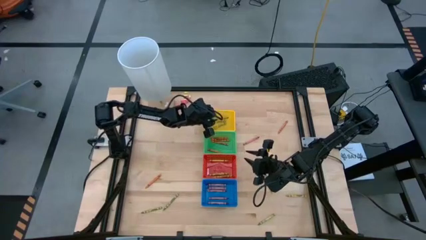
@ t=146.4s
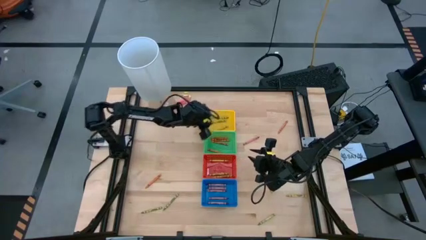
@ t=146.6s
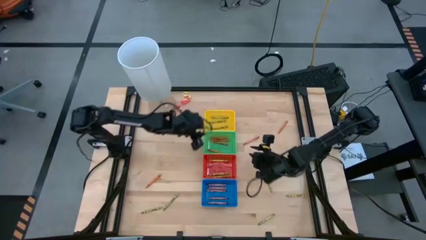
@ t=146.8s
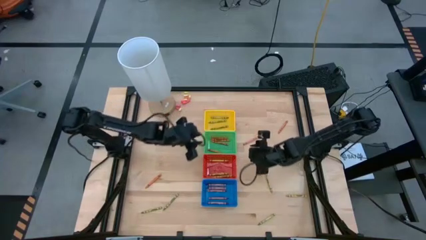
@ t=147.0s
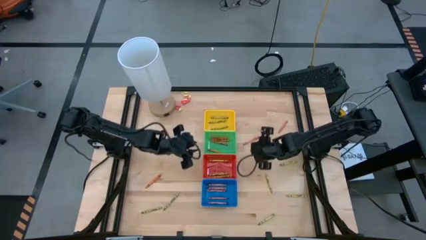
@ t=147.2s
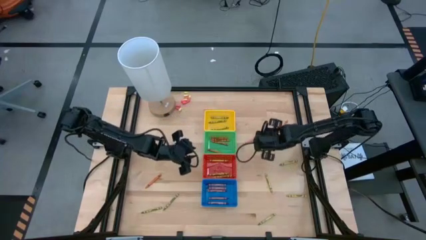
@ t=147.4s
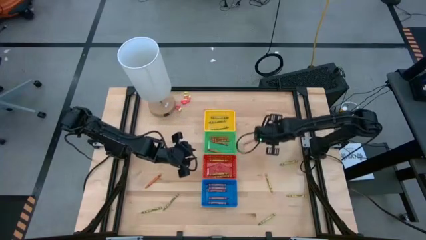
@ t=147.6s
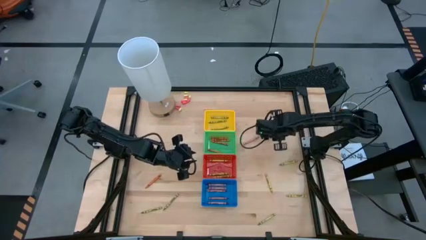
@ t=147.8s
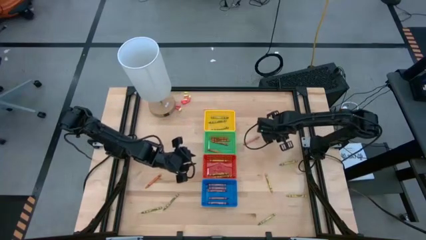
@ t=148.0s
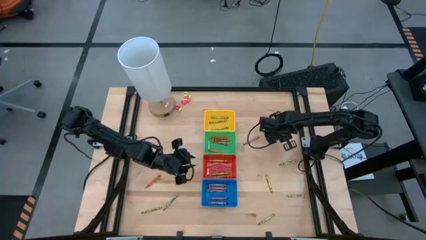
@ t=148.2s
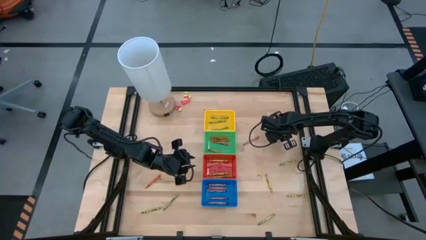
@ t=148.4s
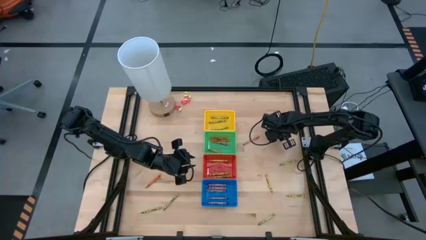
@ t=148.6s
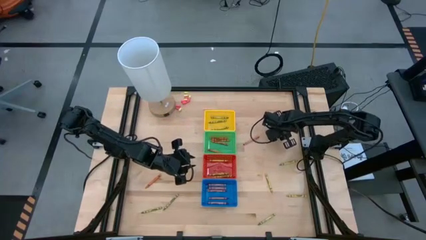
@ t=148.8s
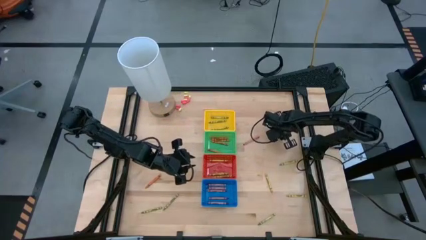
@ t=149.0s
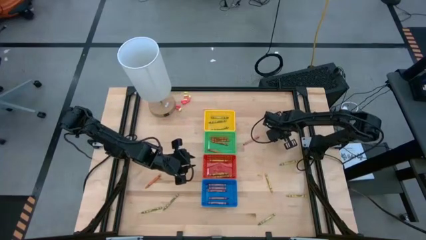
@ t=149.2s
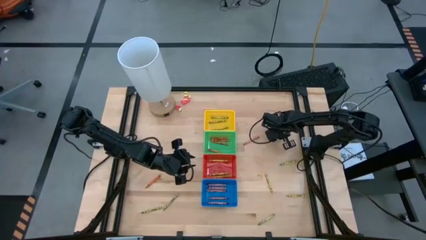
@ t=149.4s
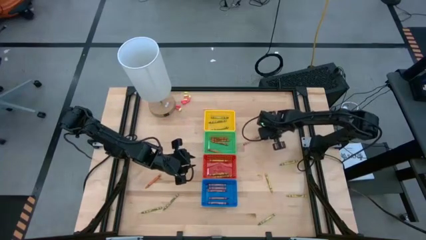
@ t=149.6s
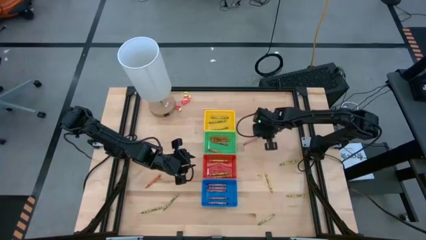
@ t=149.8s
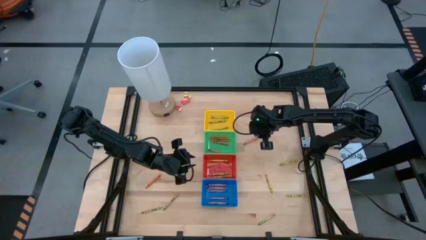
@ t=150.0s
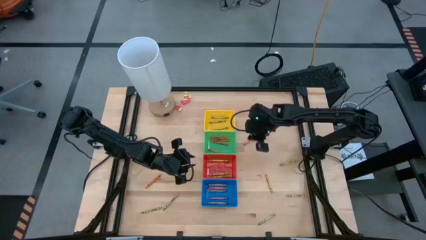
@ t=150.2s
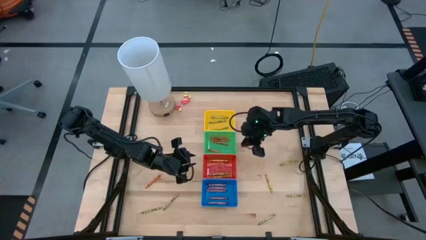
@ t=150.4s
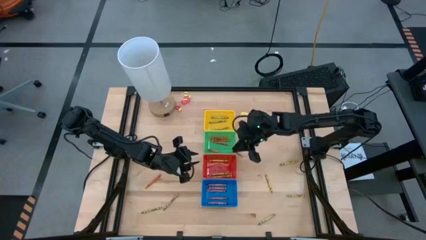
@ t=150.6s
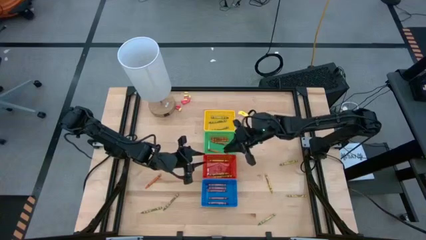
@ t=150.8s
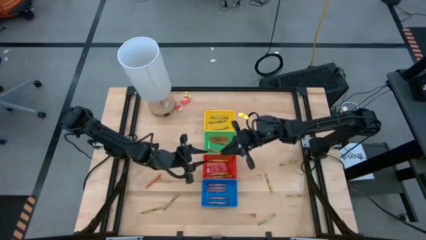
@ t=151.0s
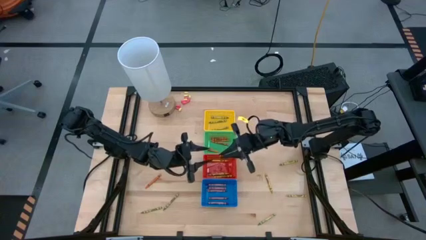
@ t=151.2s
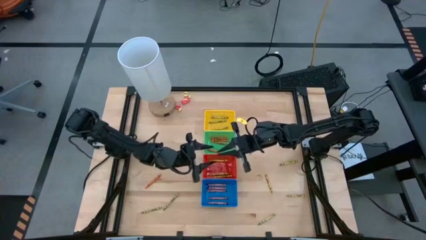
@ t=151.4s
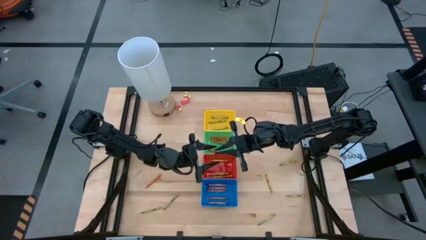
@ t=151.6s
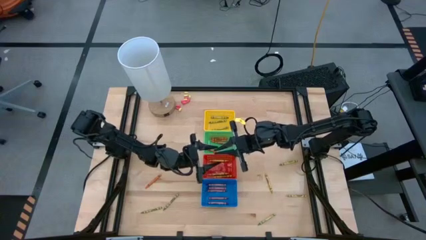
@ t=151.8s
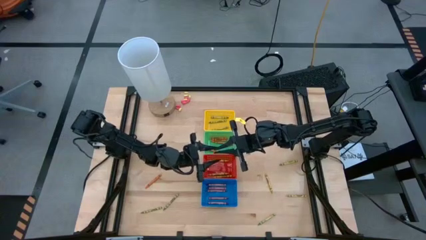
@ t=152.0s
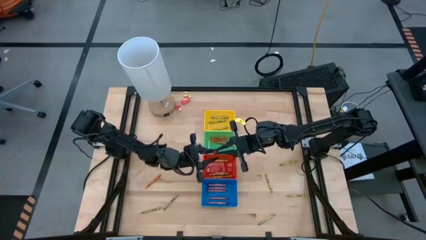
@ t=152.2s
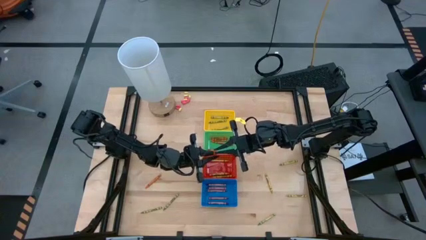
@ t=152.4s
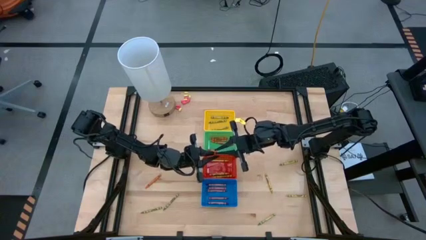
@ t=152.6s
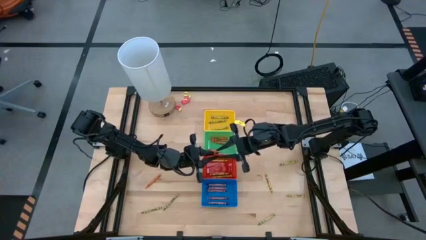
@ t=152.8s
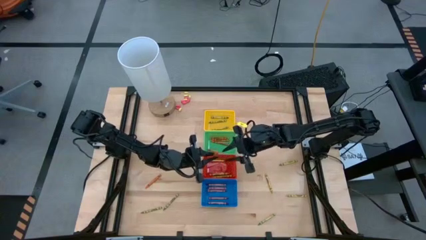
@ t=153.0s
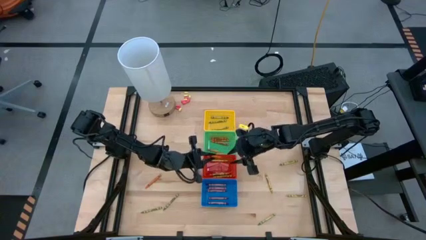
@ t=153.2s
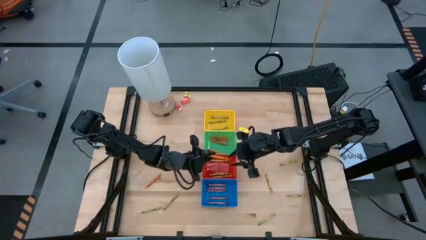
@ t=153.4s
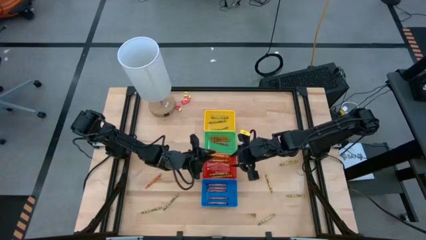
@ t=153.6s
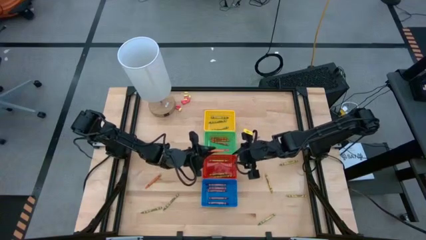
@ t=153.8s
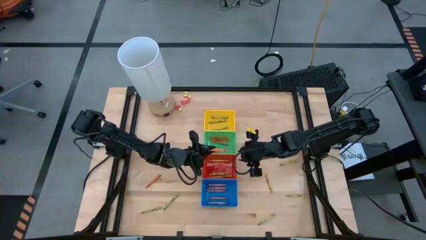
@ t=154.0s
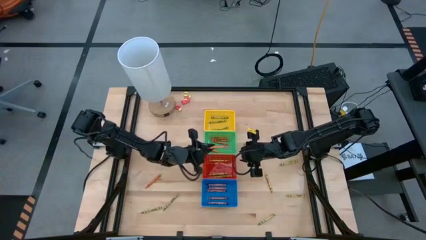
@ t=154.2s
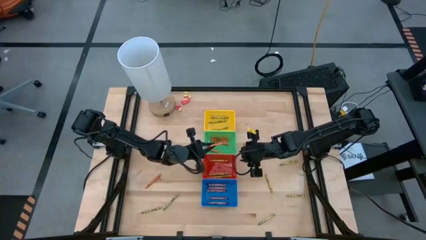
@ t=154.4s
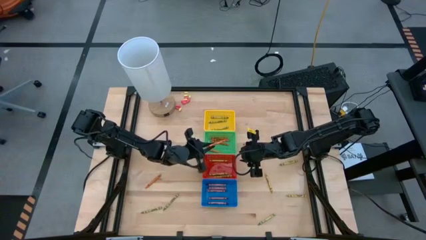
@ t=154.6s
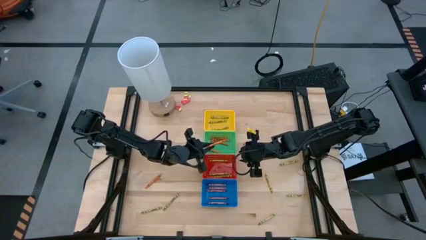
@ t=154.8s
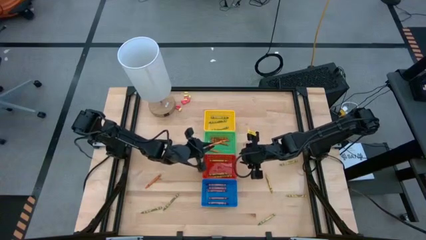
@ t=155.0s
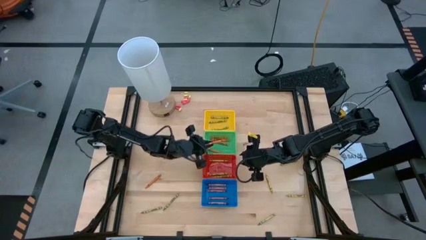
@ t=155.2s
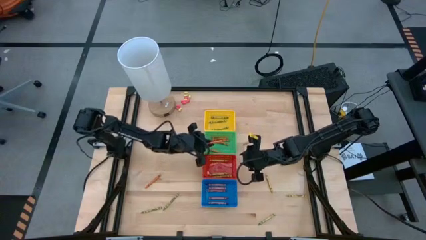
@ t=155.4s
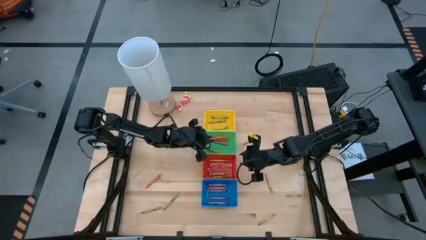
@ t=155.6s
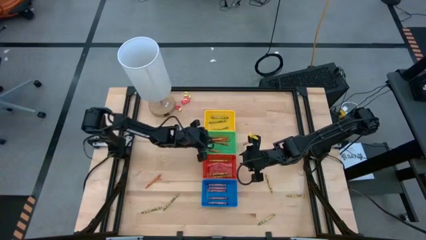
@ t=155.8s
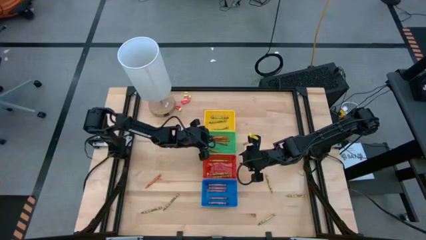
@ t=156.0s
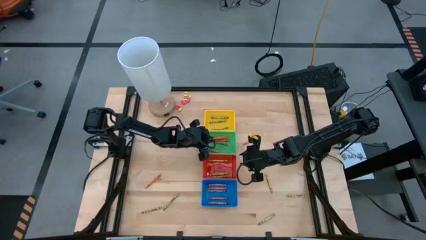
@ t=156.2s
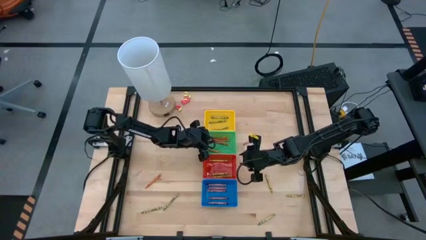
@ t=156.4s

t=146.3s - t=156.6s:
Task: Sort crayons
Put the orange crayon into the green bin

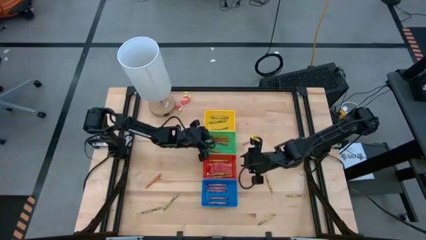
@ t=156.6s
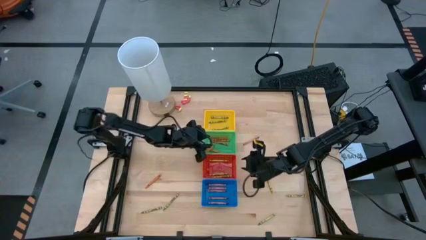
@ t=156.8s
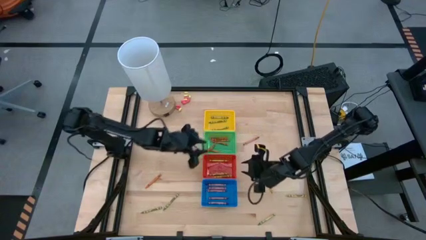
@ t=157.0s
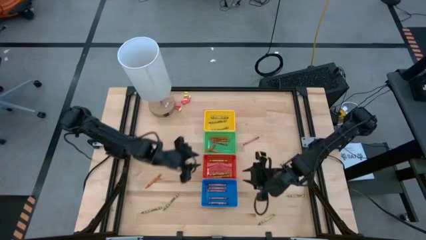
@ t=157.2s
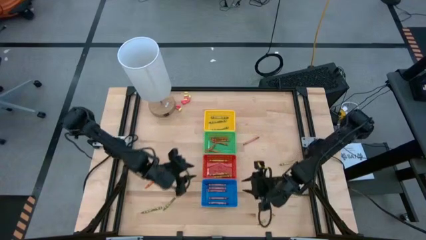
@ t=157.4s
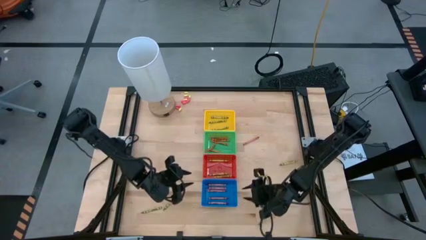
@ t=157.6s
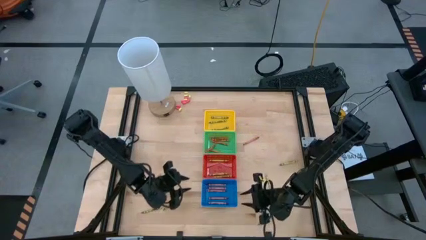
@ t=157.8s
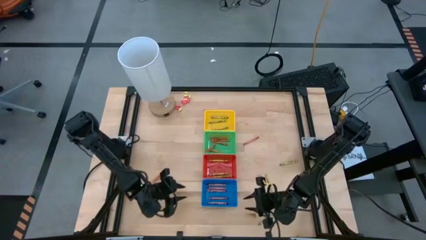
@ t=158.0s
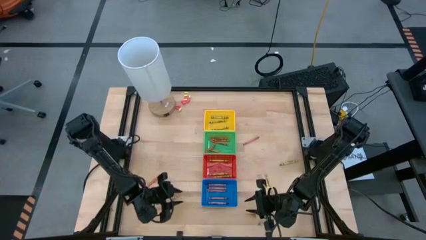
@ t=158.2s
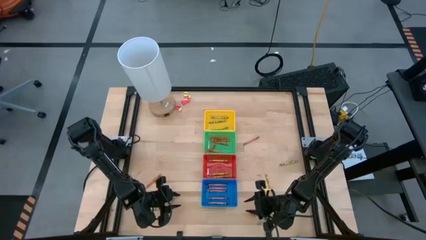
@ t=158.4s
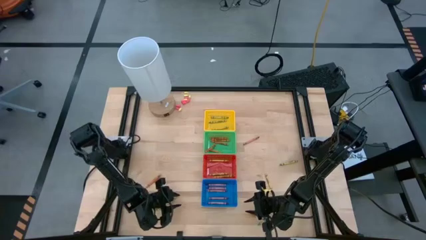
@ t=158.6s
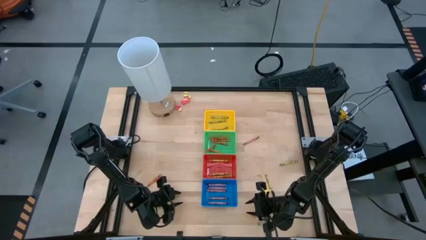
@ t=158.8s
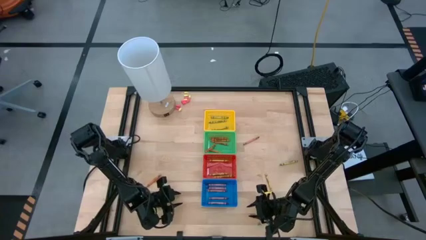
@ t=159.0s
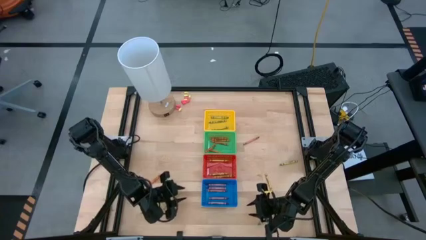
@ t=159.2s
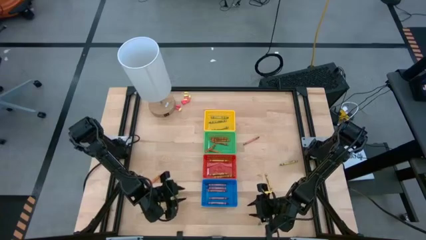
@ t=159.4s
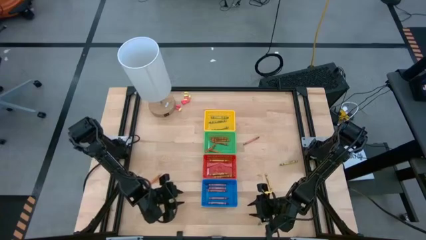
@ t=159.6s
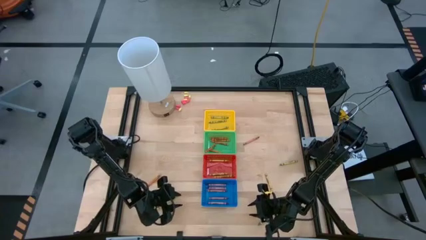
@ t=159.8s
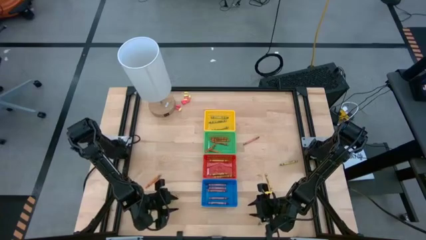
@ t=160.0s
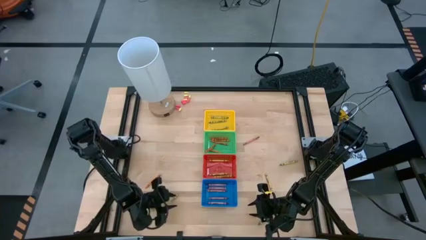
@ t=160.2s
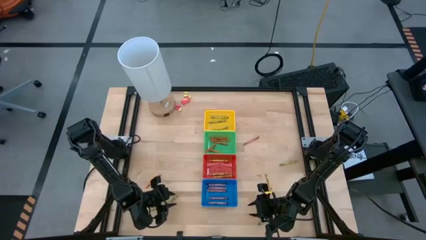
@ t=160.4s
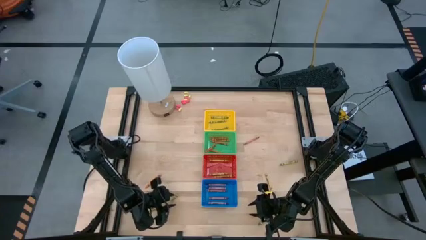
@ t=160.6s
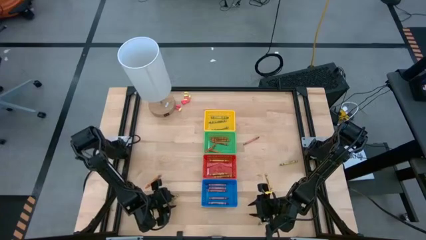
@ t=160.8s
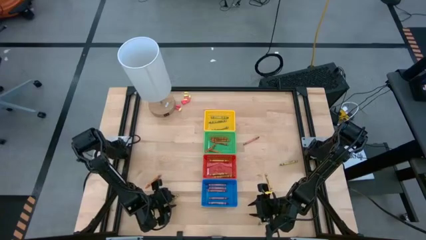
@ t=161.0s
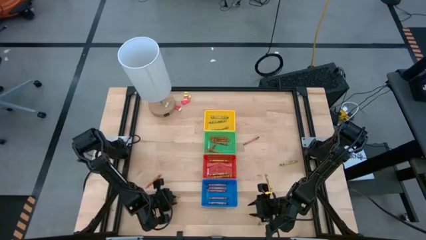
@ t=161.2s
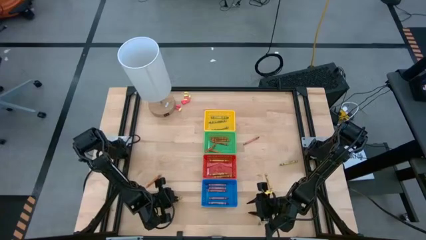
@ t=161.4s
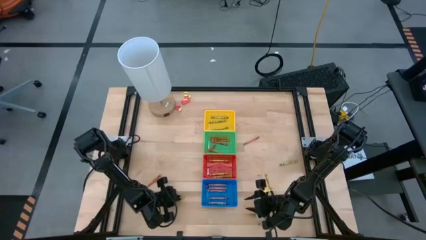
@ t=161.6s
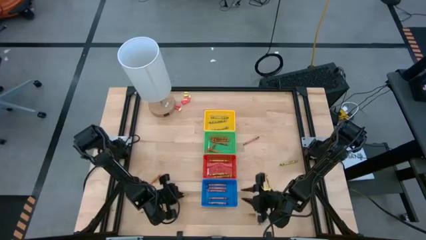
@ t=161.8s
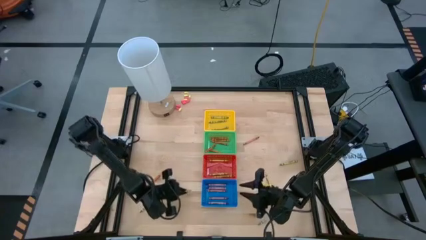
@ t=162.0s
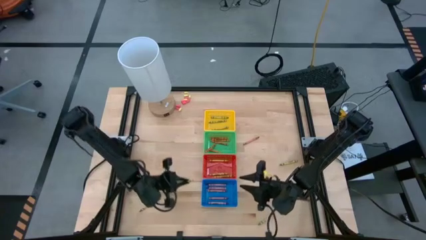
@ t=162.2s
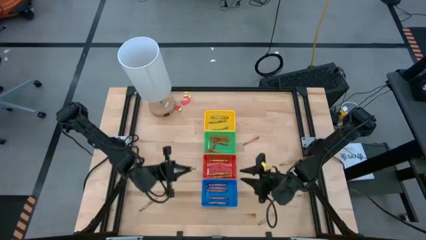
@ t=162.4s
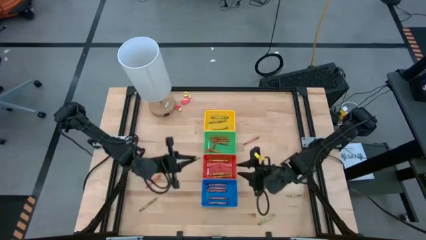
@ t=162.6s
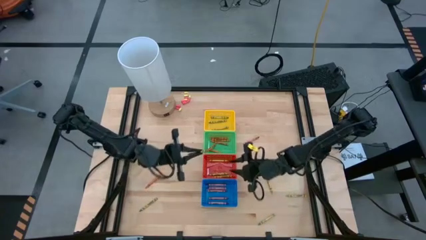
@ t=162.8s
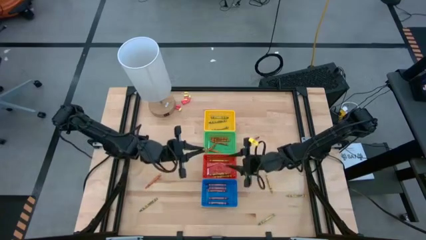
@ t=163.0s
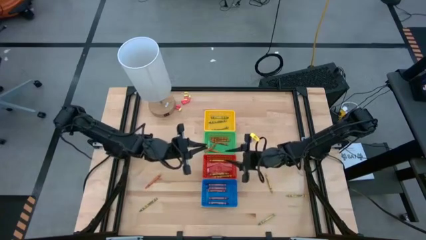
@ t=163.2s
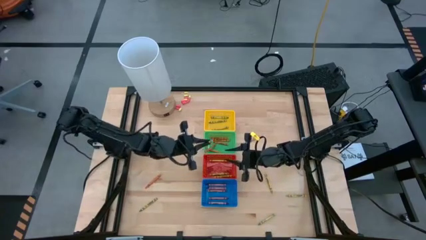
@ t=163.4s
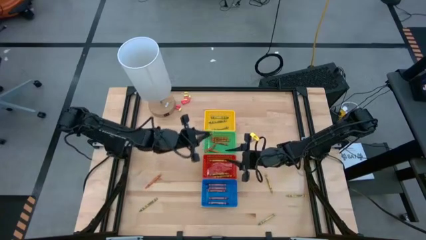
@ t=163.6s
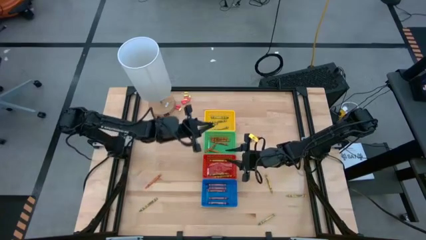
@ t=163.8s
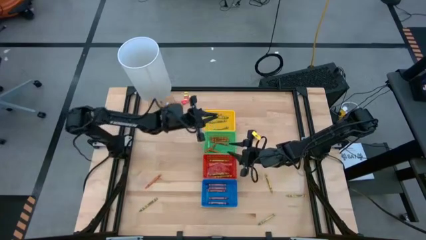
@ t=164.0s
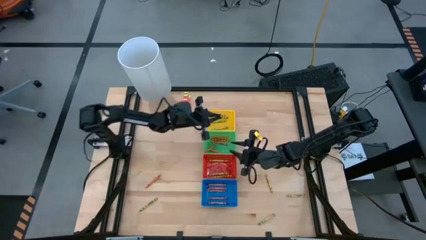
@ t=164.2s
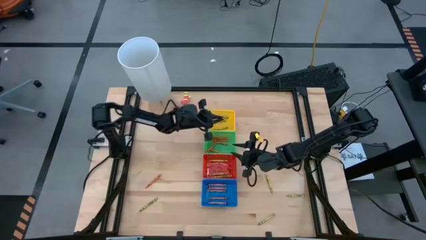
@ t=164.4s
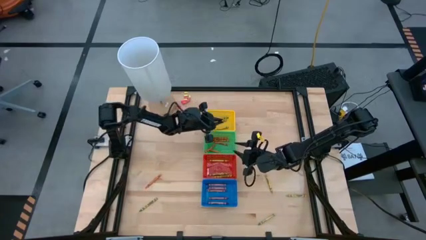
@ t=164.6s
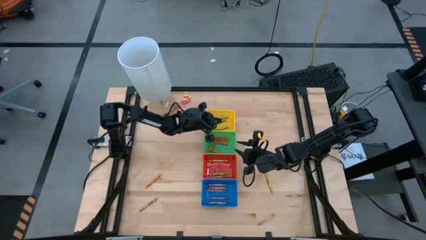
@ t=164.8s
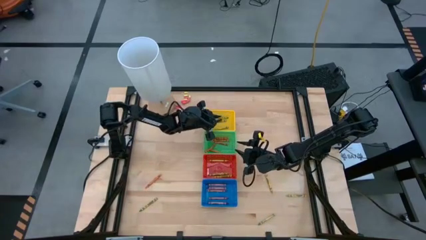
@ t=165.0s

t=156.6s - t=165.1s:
Put the green crayon into the yellow bin
